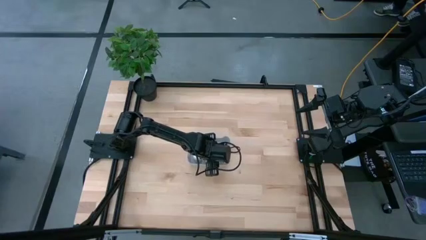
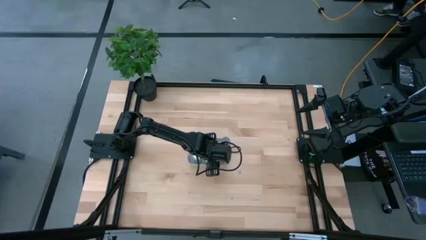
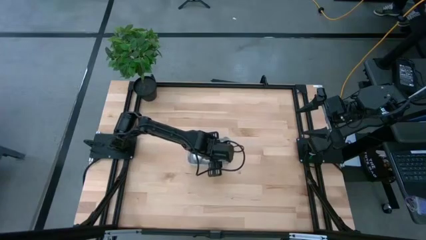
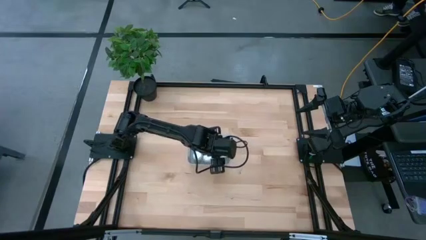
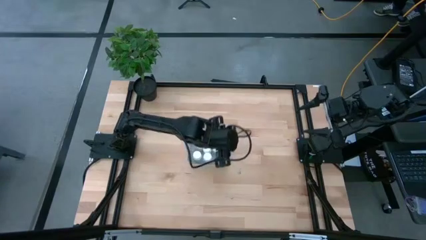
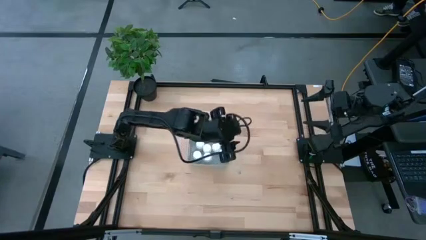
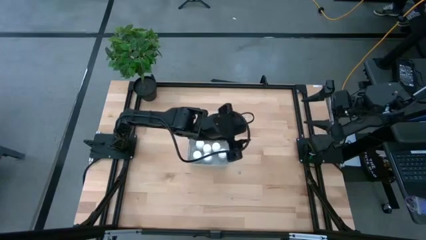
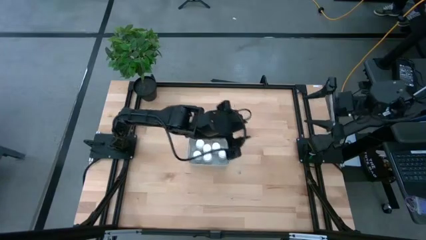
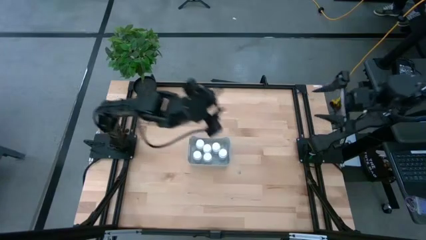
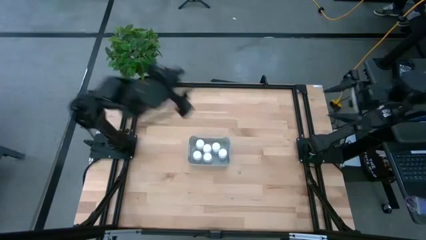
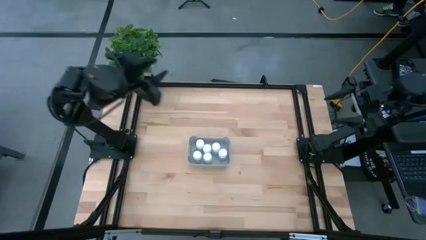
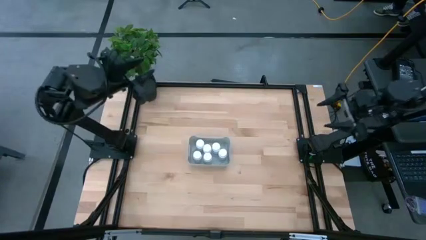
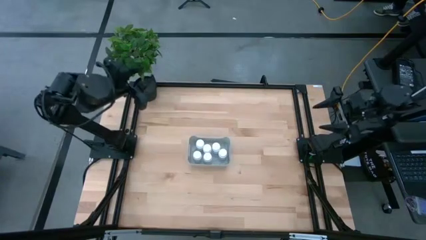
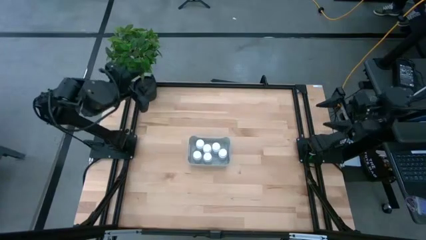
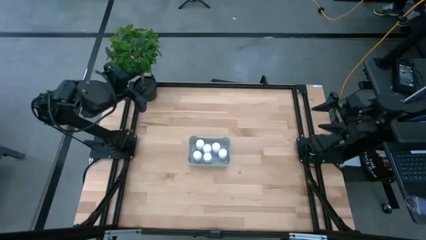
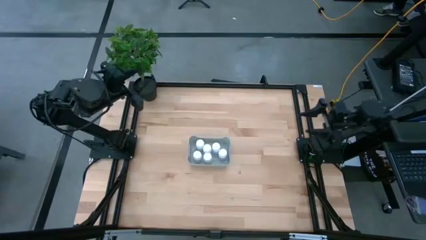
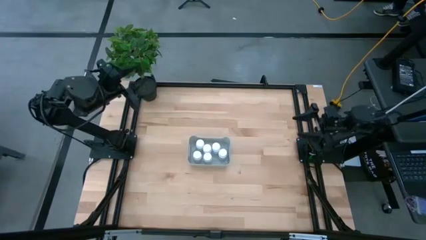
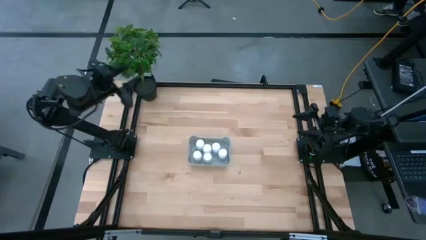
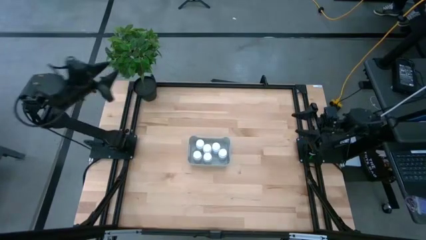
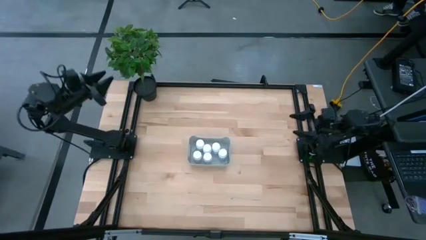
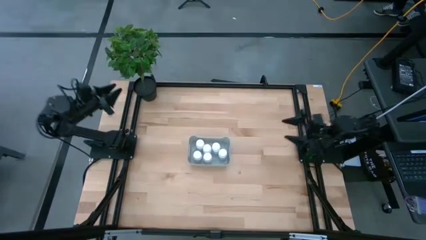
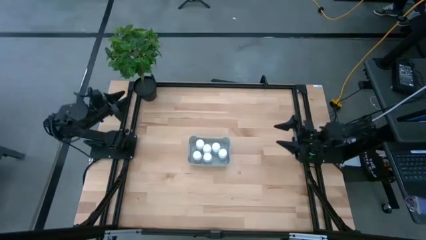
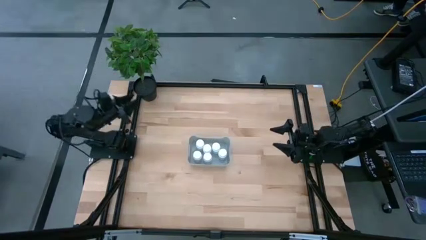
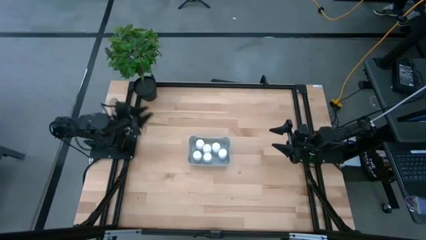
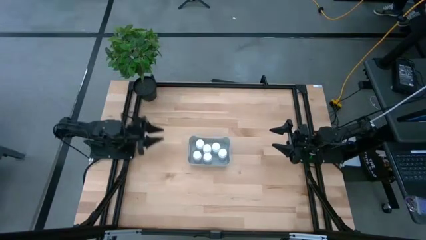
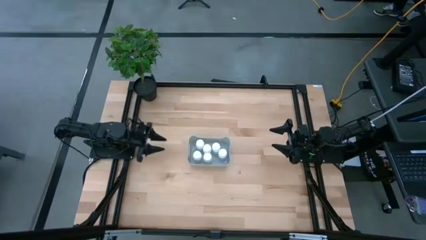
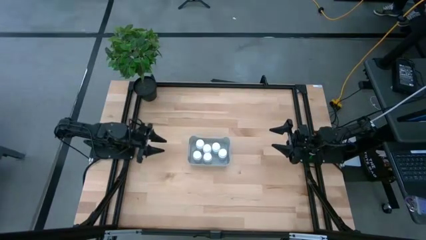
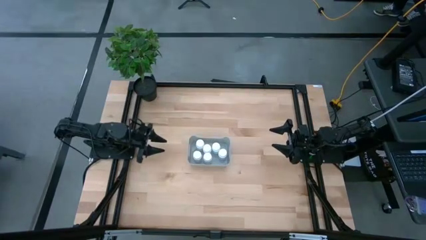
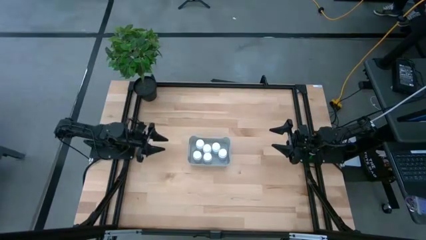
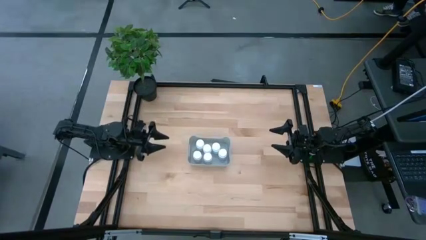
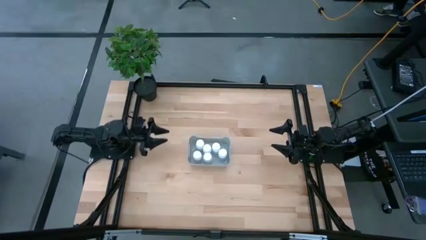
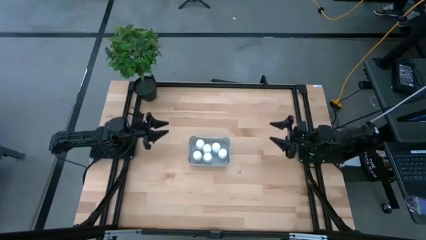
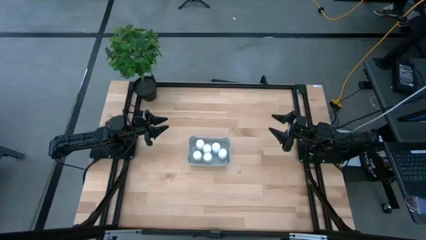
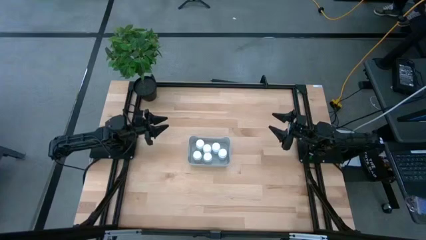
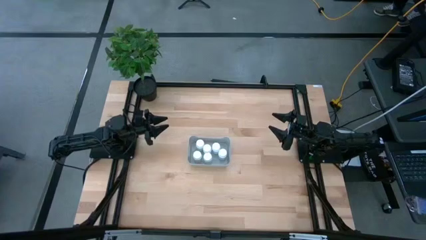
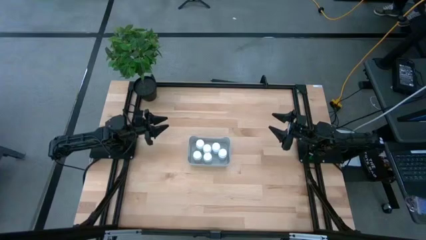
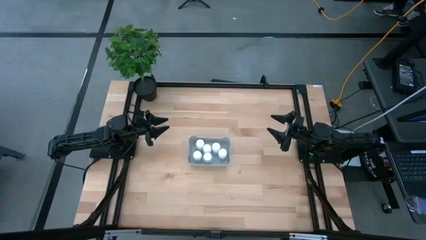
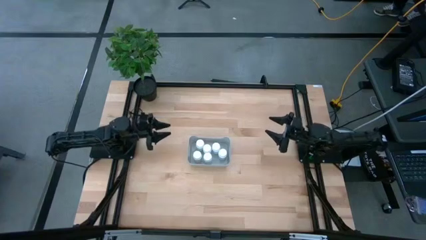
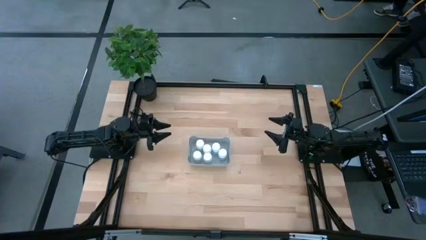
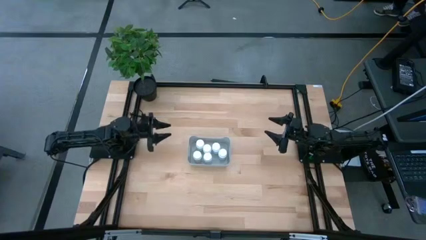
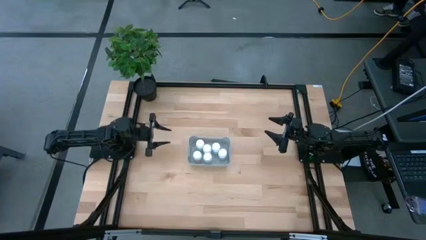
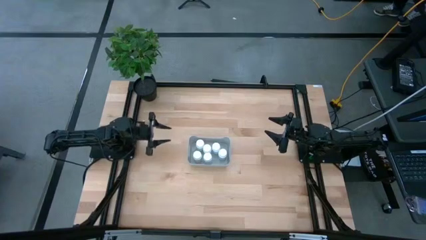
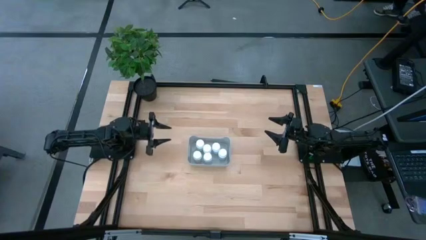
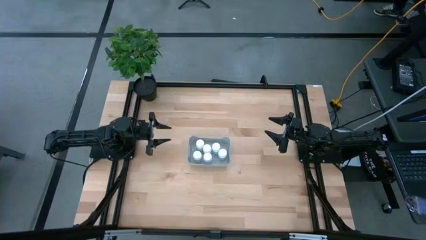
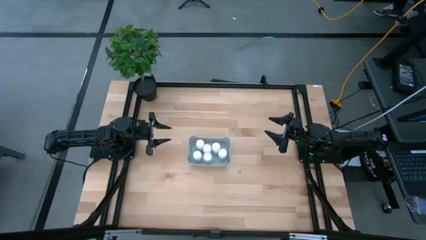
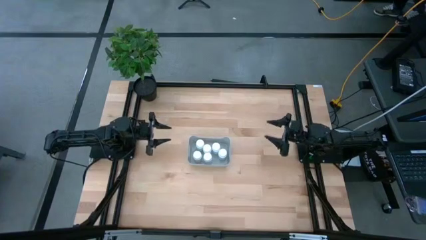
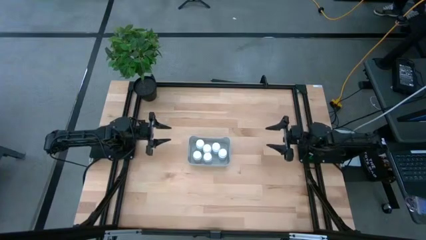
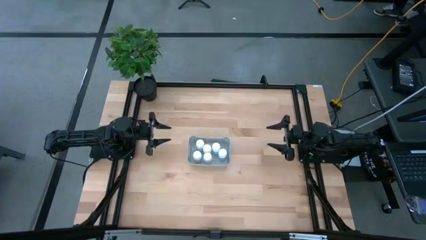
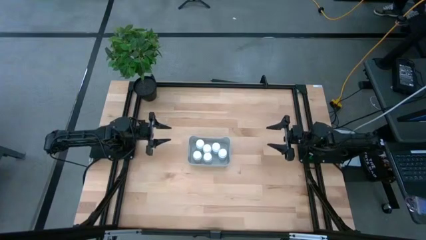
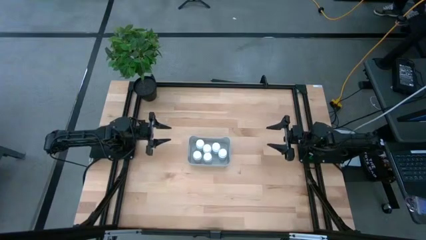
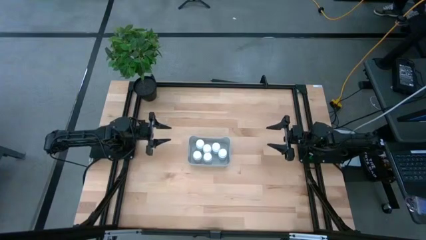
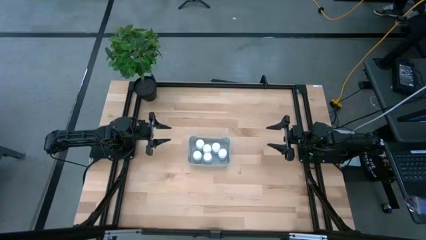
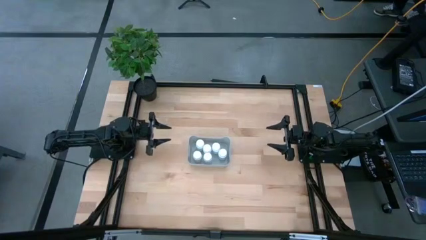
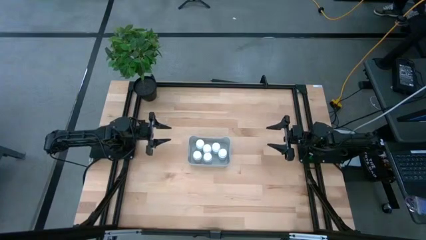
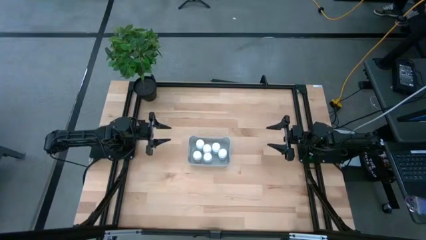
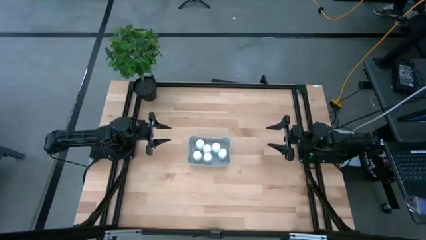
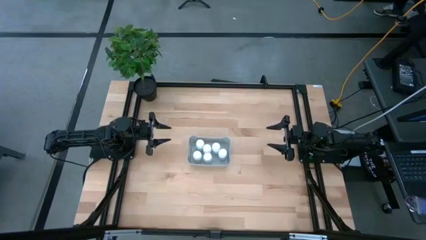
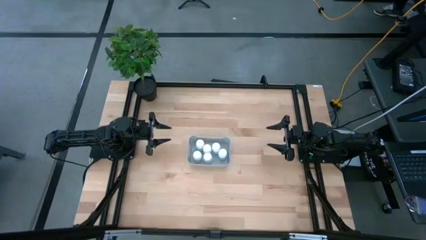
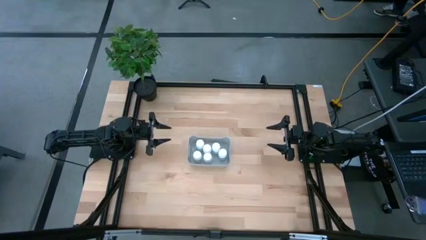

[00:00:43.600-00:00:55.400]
Task: Pick and place pill bottles into a basket
Return to Home Position
